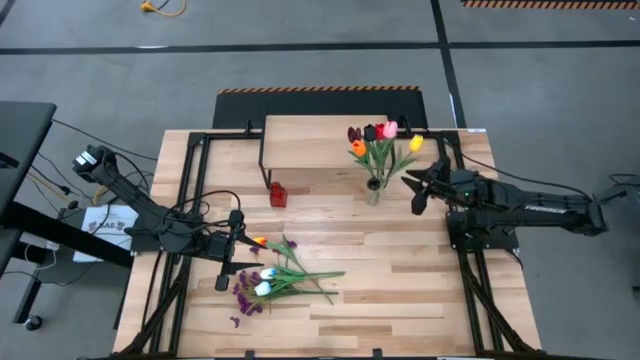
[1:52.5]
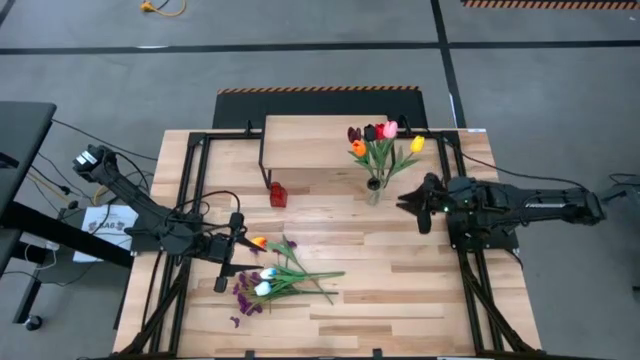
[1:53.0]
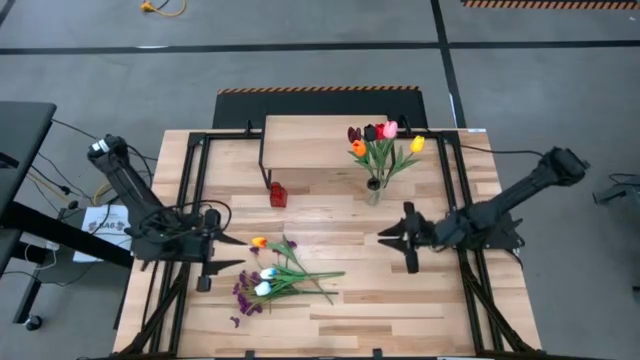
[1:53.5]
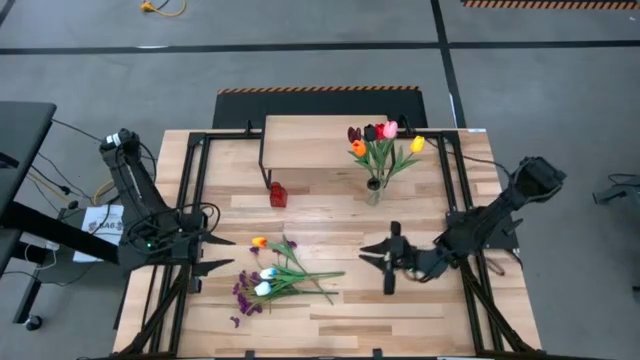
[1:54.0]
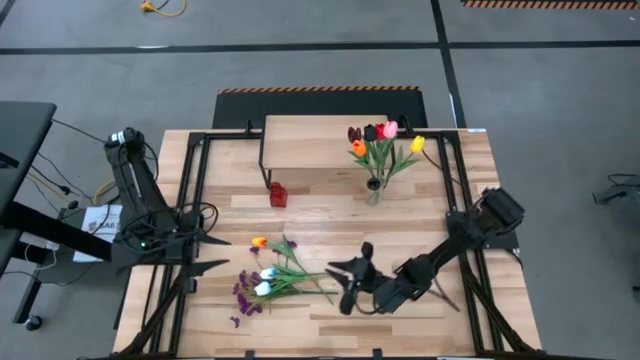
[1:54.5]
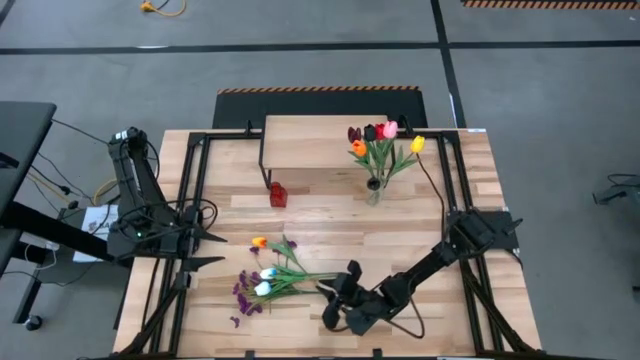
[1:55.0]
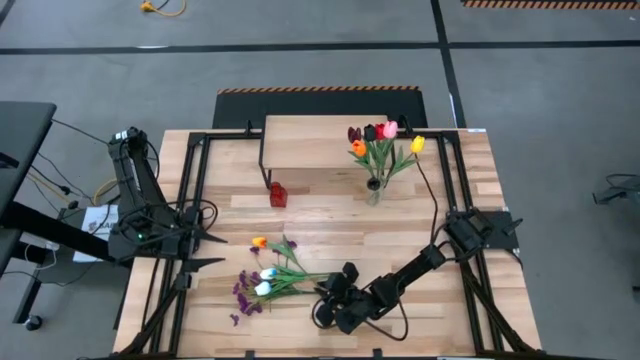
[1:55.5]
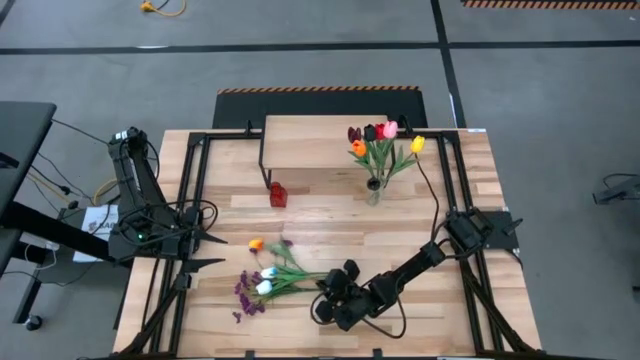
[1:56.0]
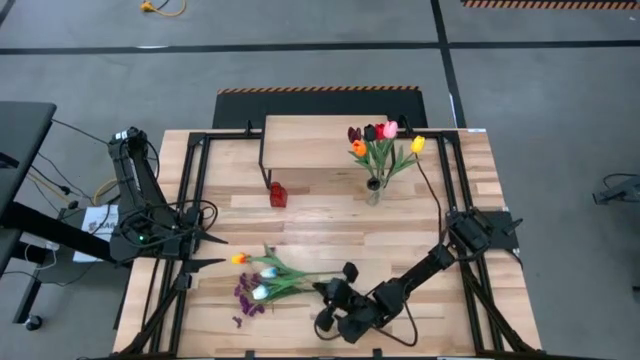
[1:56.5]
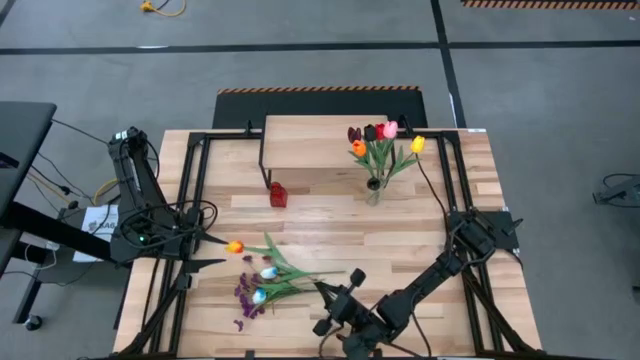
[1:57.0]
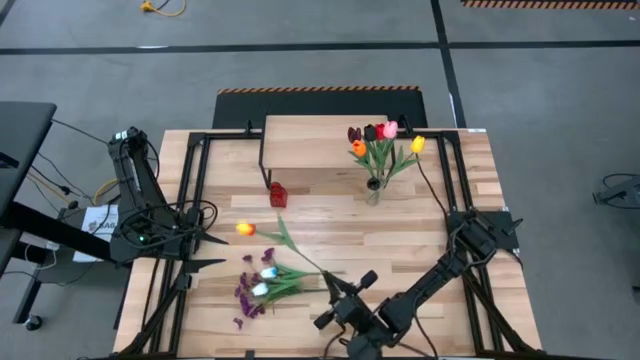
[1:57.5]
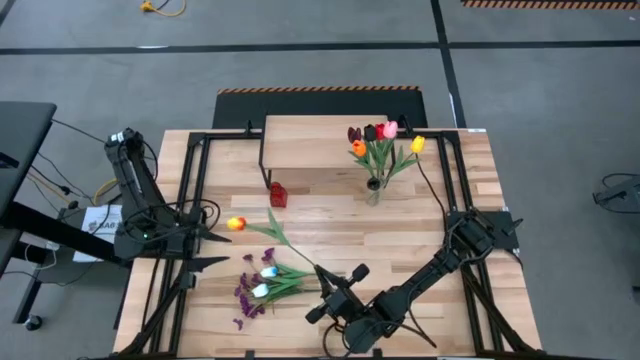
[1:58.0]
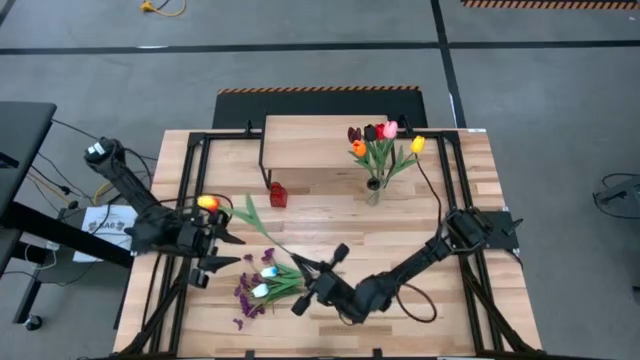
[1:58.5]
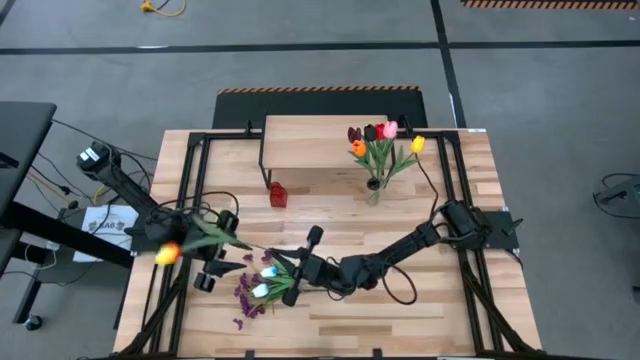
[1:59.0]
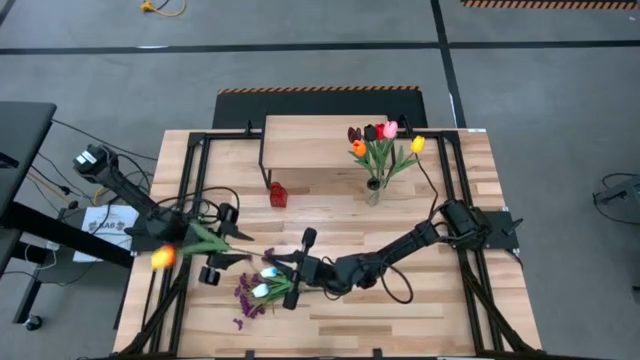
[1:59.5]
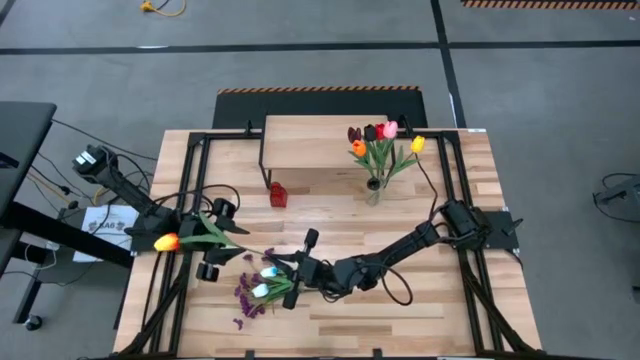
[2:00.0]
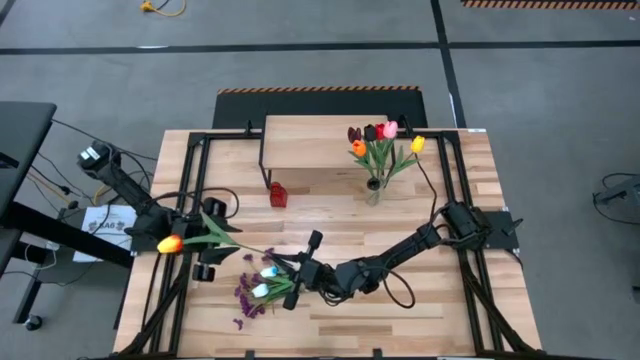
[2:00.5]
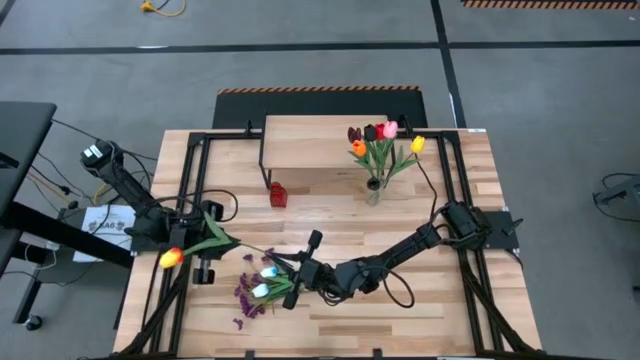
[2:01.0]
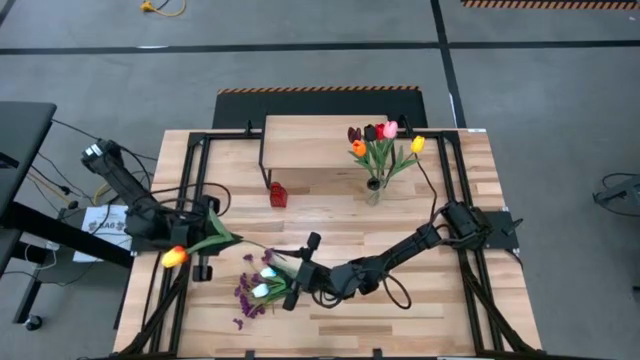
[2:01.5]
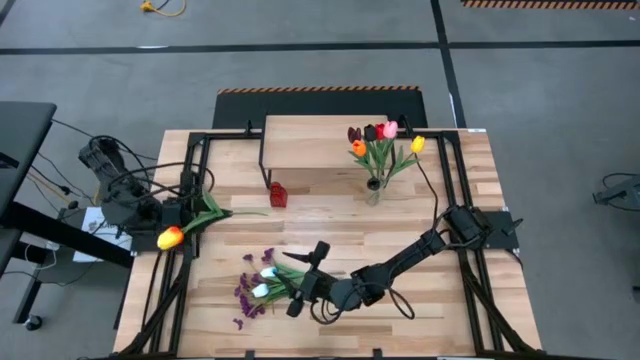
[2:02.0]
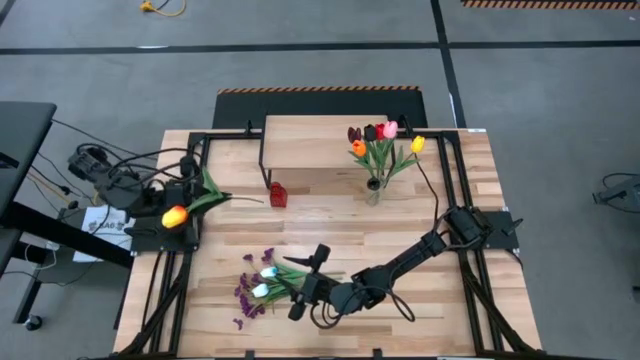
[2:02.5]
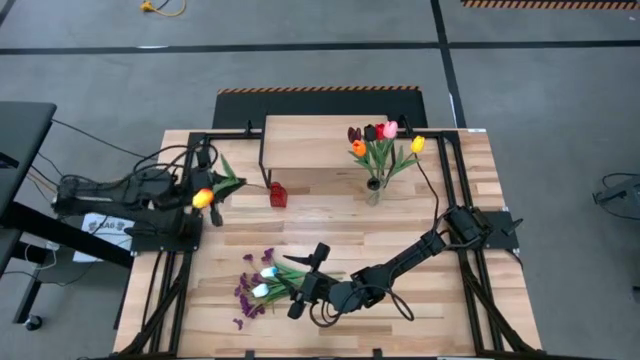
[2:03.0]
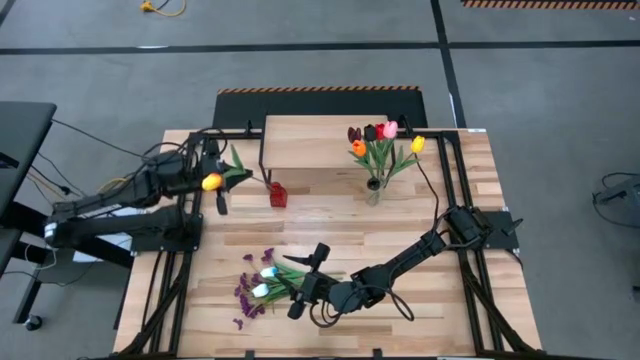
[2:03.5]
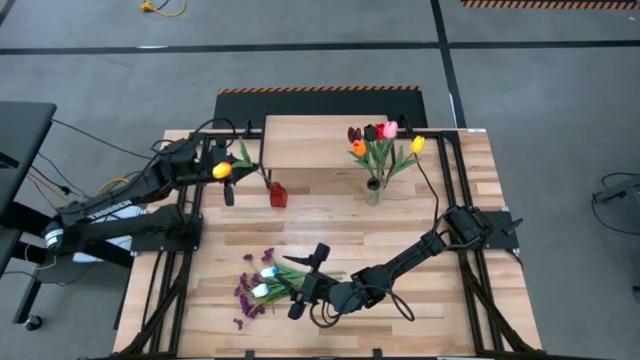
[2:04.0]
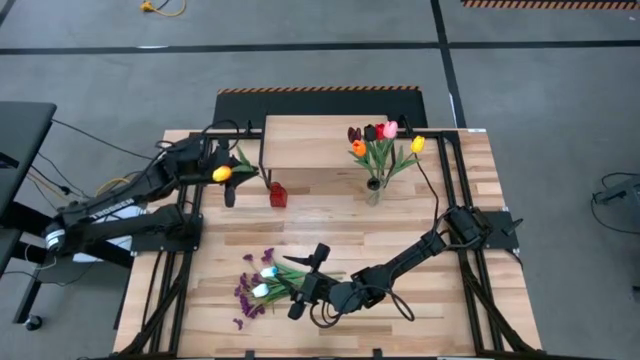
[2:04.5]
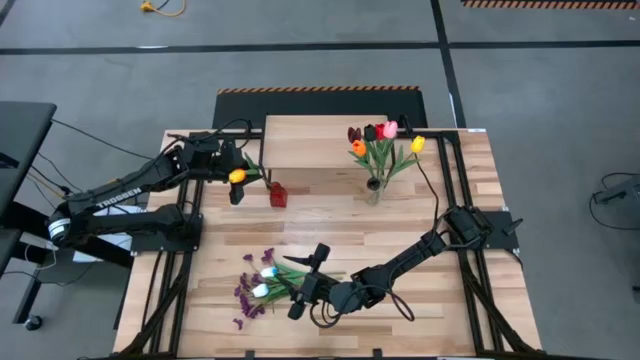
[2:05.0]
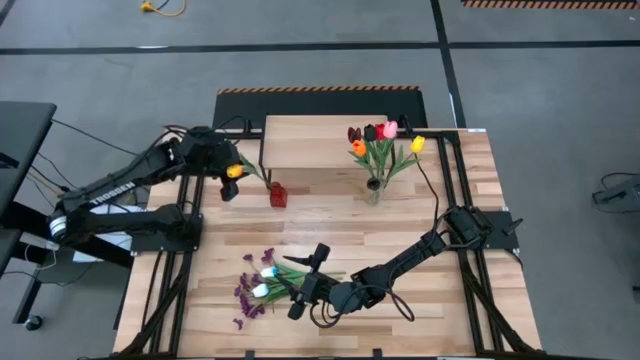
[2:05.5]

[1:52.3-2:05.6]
Task: Pick and place flowers into a vace then onto a shelf
Put the yellow flower into the red vase

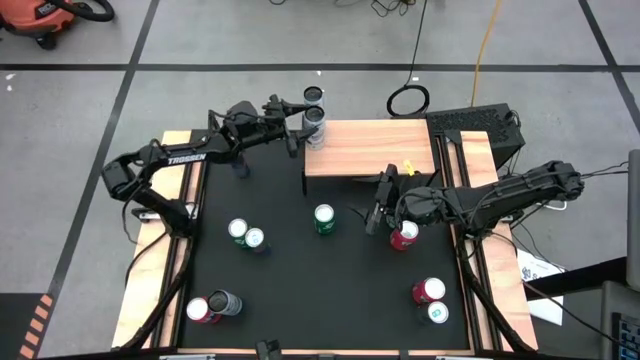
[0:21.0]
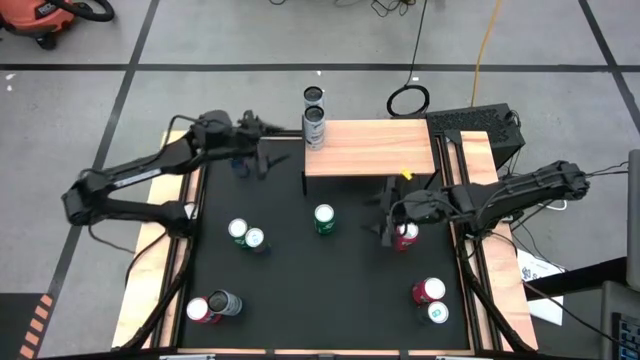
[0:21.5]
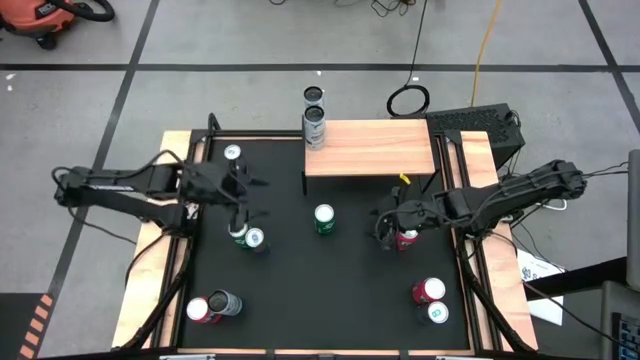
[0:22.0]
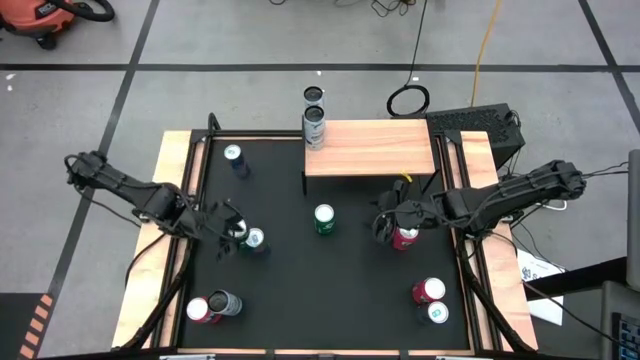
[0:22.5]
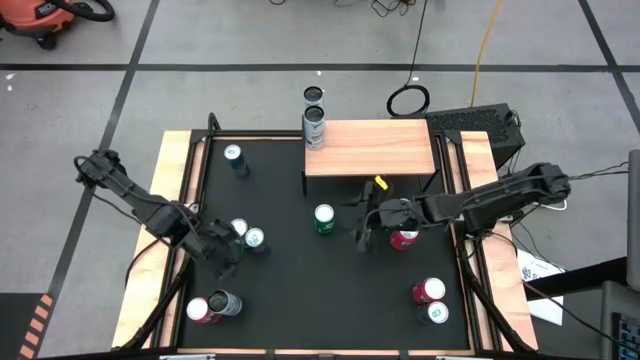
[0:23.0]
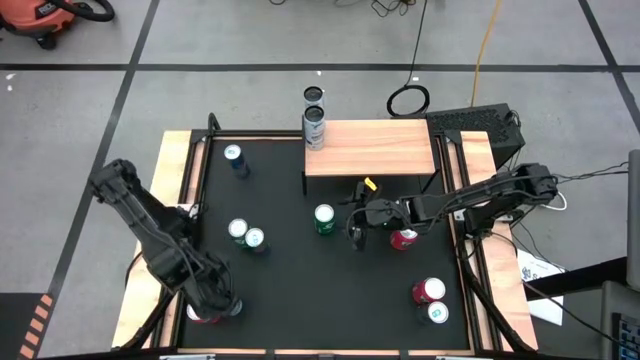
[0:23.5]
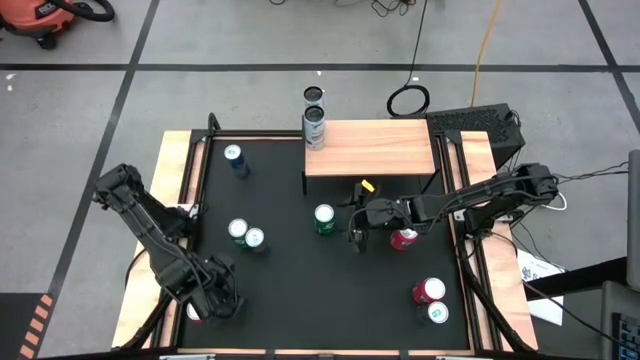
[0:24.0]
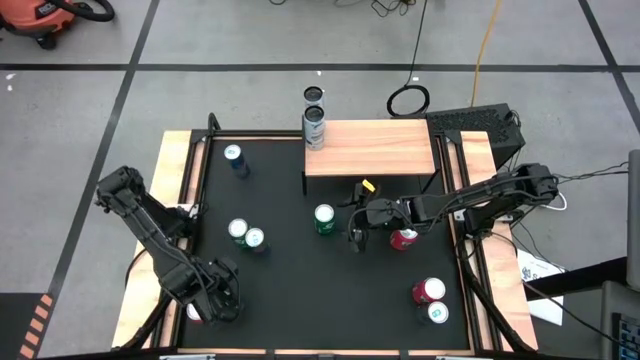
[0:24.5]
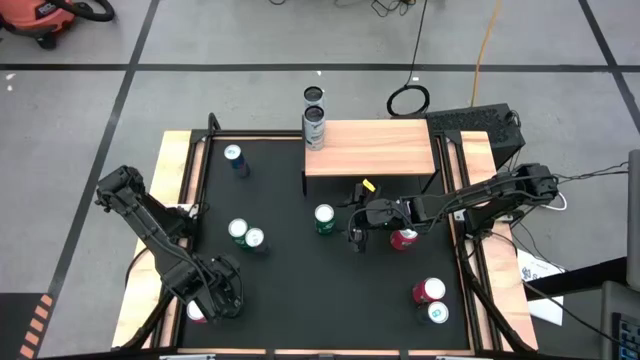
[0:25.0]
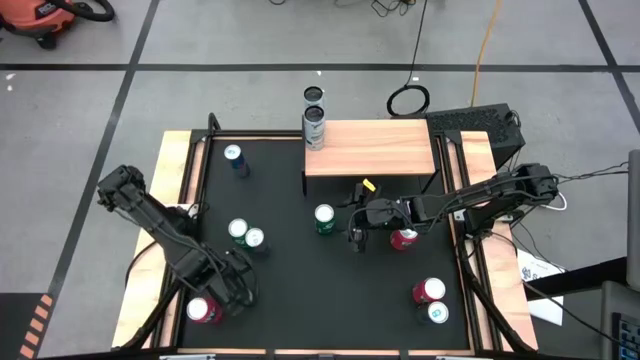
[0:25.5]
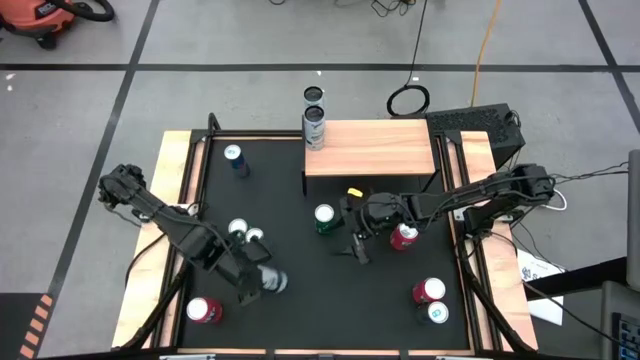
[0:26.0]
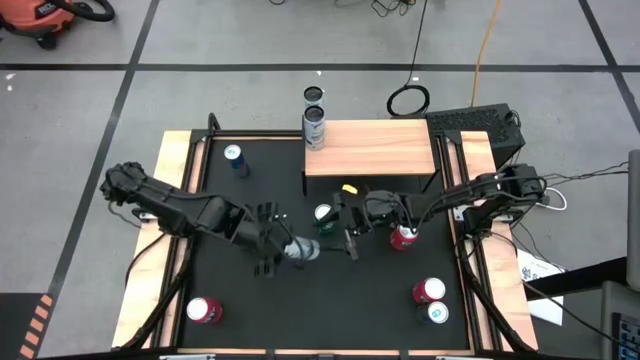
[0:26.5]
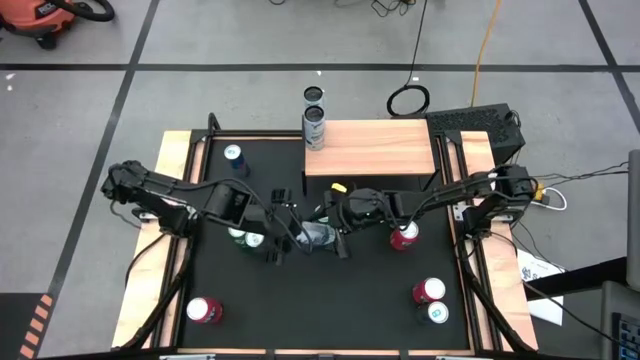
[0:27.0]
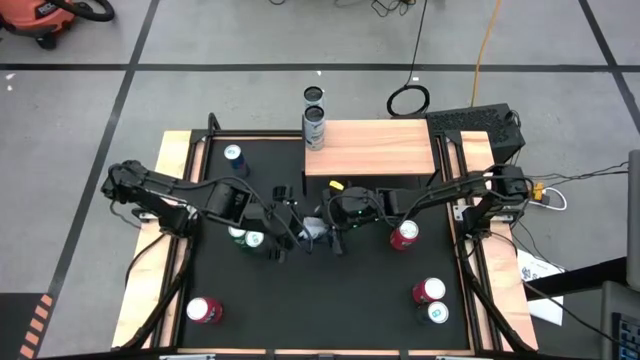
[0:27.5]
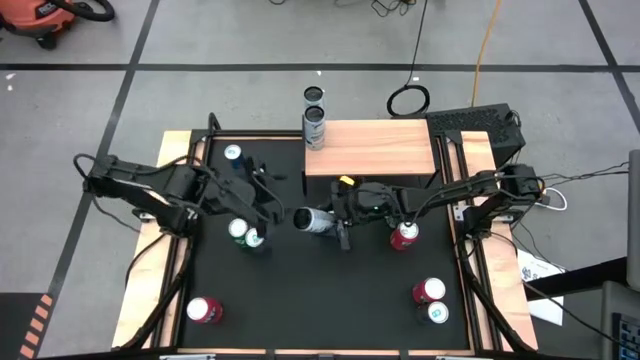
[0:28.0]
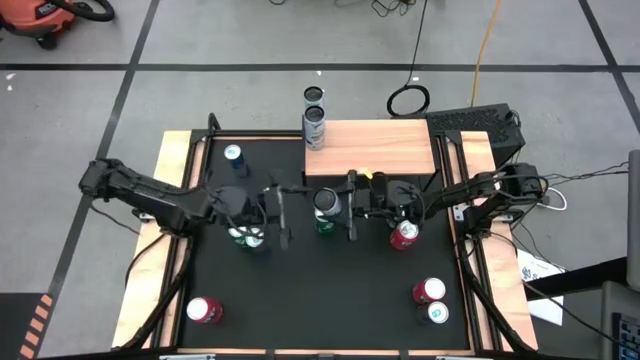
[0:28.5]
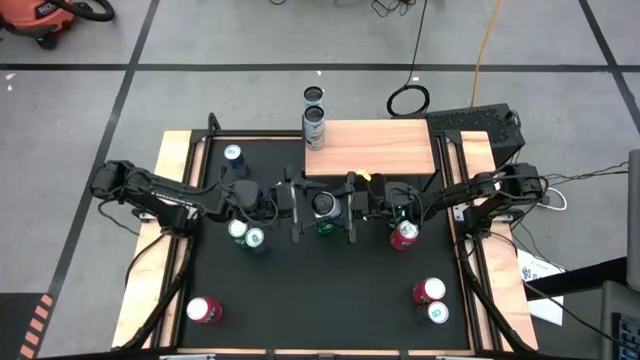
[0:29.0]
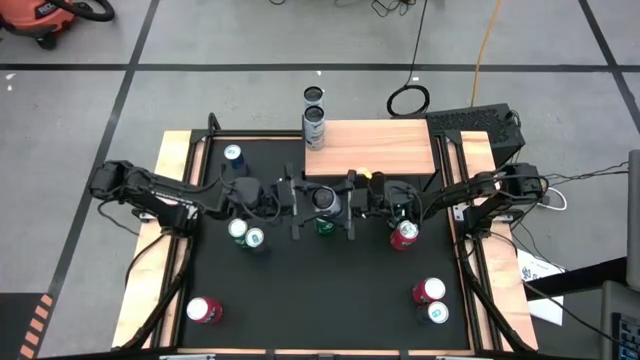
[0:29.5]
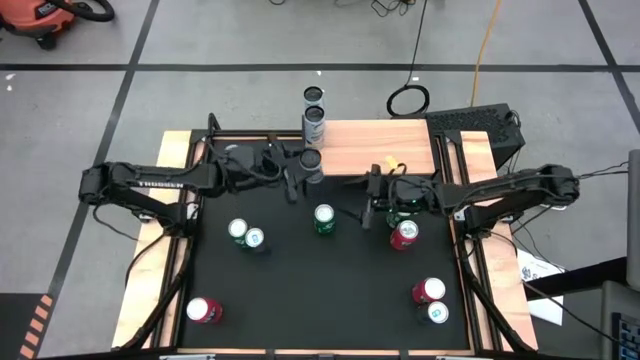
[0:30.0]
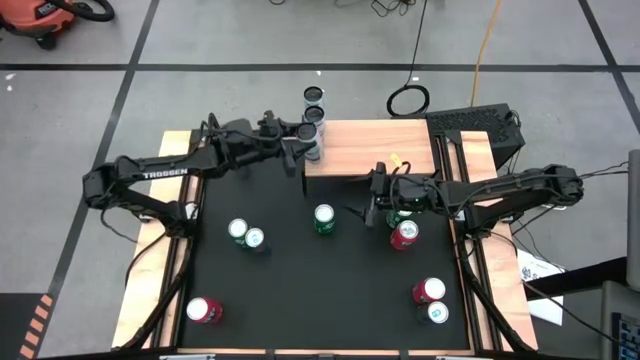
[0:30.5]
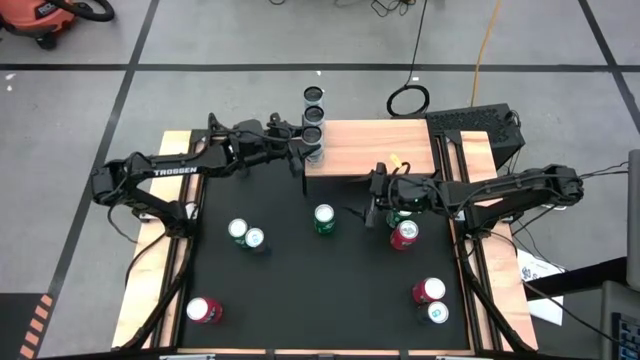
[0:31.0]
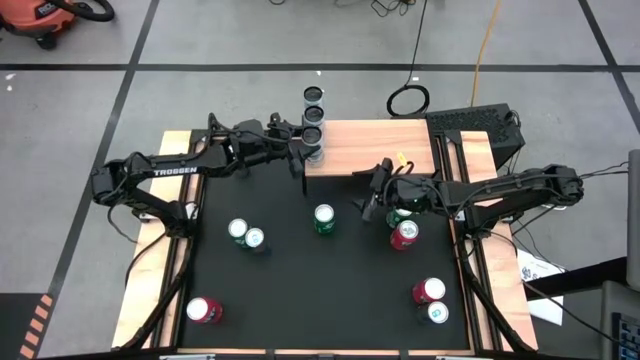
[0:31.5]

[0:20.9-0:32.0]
Task: Place canned beverage on shelf
Put the white blue soda can on the shelf aligned with the other white blue soda can
